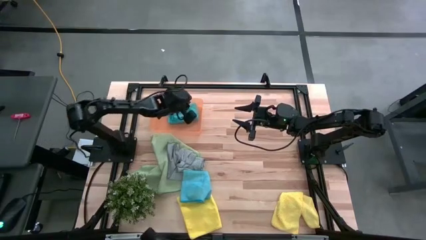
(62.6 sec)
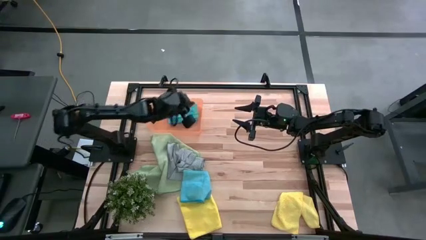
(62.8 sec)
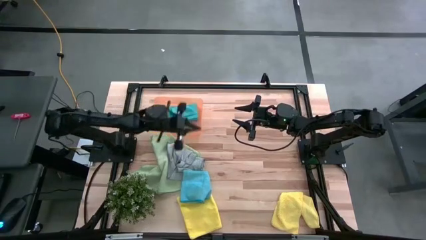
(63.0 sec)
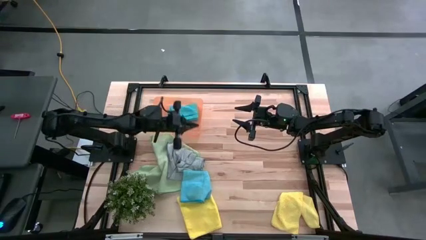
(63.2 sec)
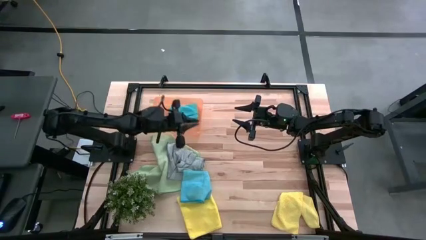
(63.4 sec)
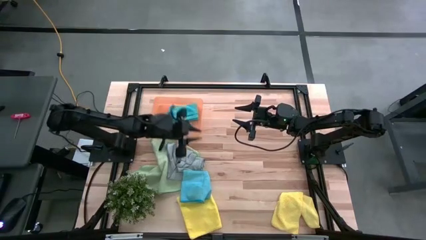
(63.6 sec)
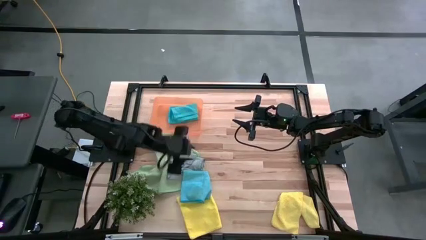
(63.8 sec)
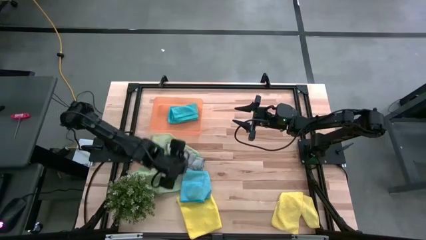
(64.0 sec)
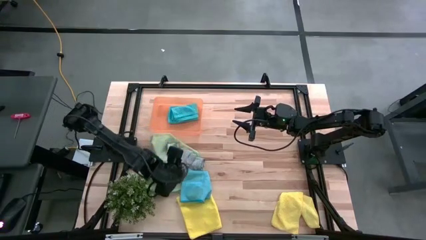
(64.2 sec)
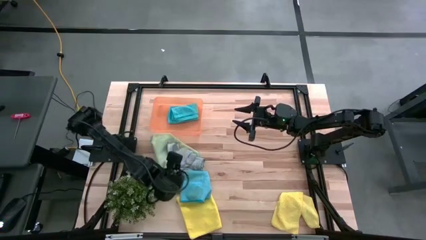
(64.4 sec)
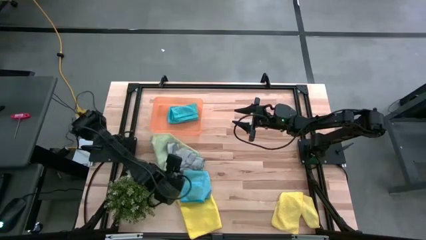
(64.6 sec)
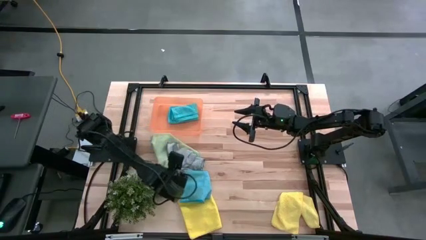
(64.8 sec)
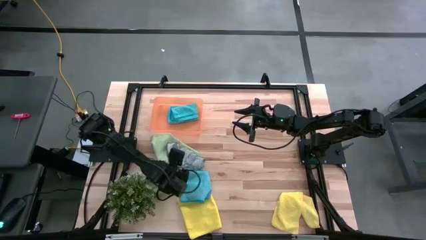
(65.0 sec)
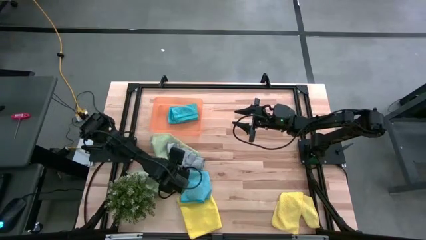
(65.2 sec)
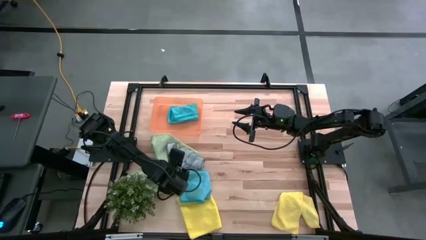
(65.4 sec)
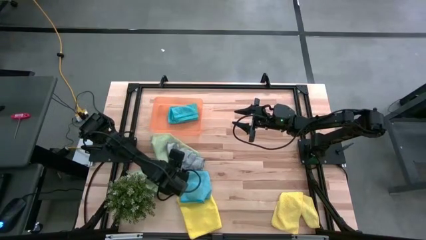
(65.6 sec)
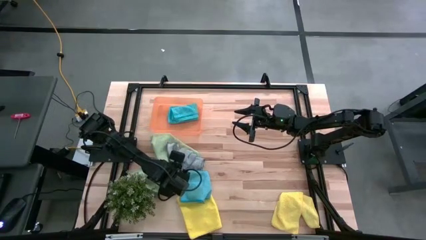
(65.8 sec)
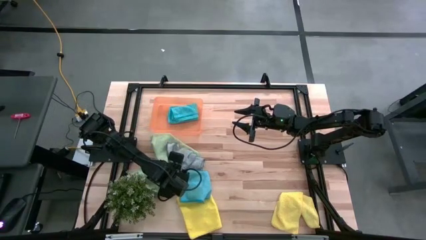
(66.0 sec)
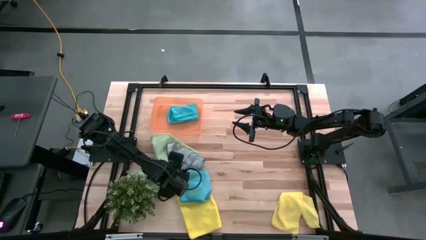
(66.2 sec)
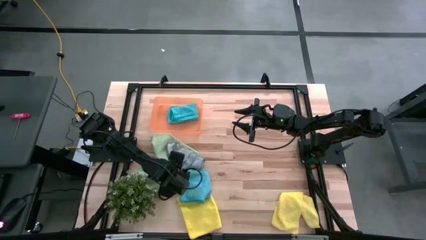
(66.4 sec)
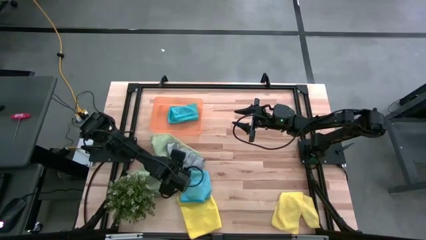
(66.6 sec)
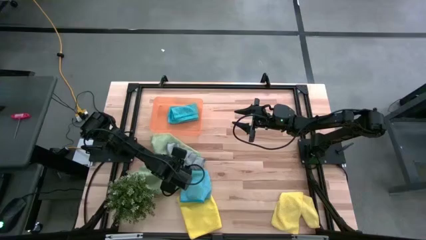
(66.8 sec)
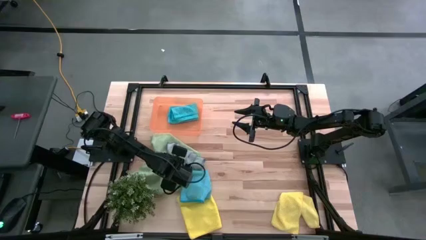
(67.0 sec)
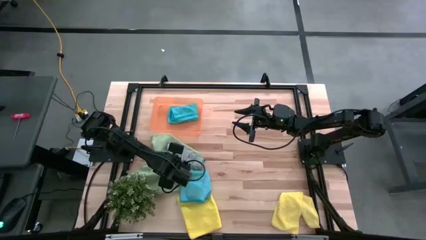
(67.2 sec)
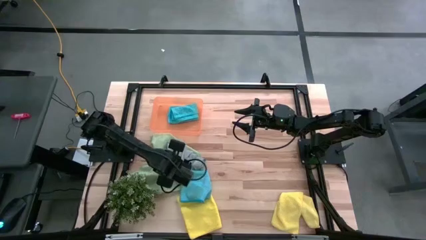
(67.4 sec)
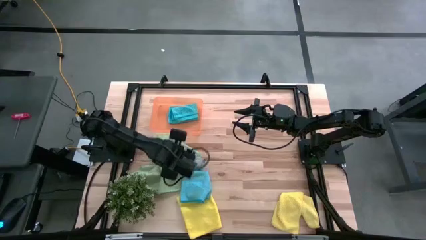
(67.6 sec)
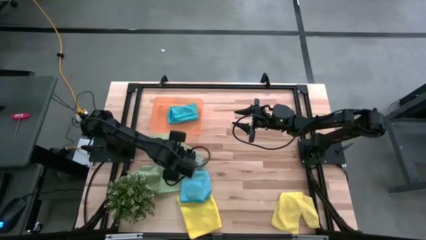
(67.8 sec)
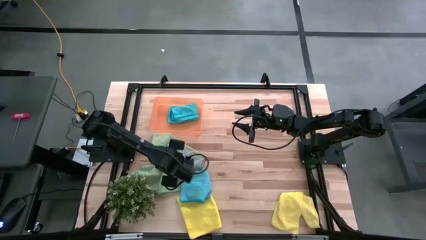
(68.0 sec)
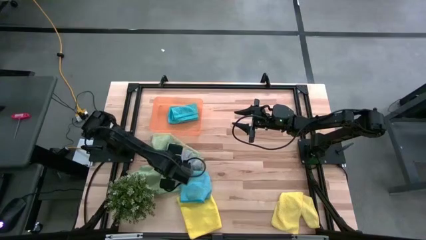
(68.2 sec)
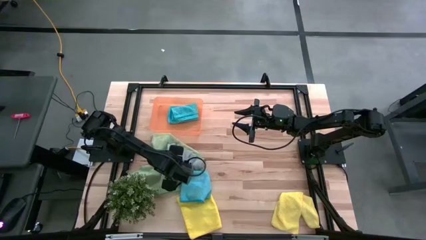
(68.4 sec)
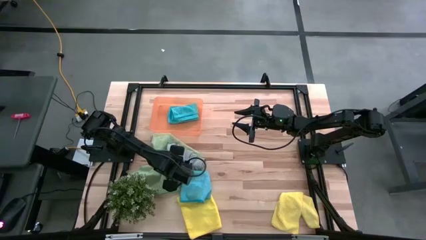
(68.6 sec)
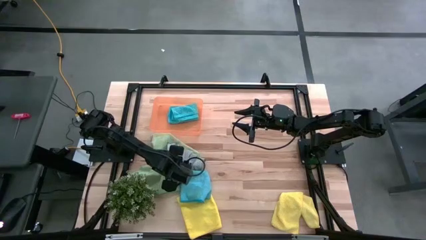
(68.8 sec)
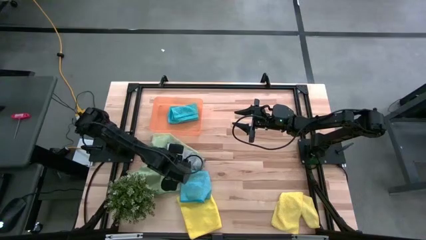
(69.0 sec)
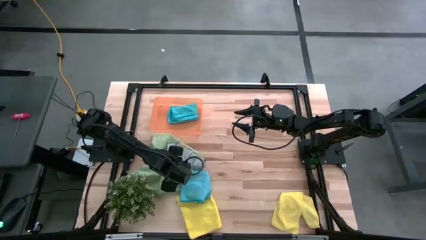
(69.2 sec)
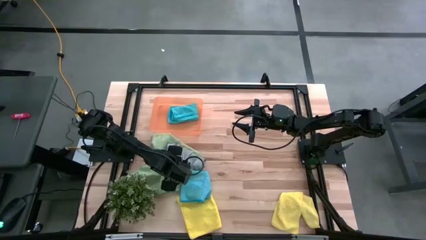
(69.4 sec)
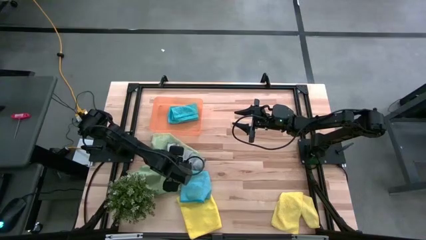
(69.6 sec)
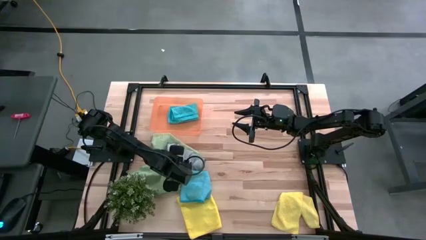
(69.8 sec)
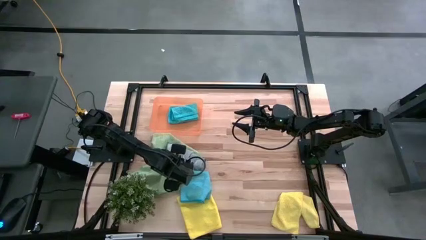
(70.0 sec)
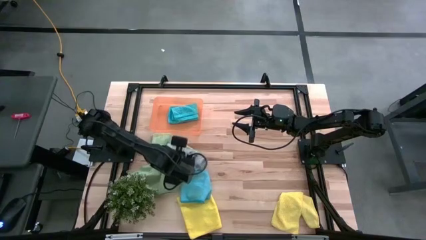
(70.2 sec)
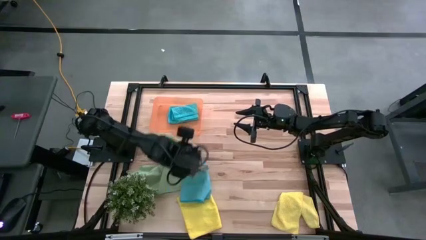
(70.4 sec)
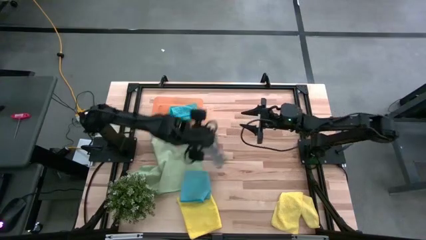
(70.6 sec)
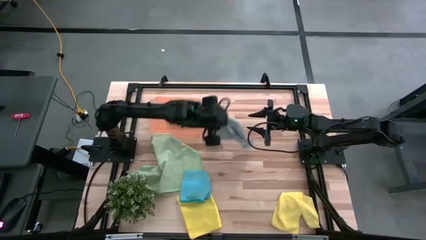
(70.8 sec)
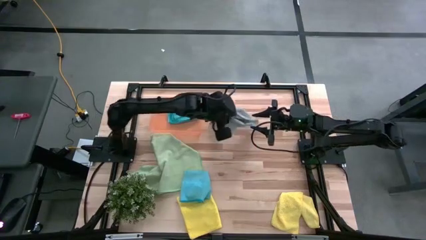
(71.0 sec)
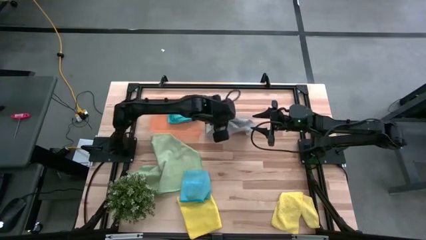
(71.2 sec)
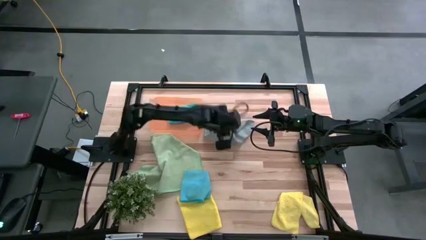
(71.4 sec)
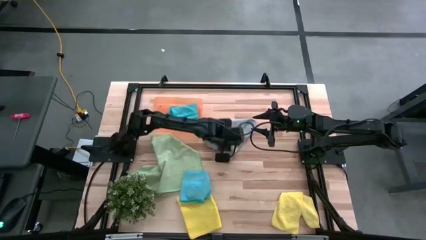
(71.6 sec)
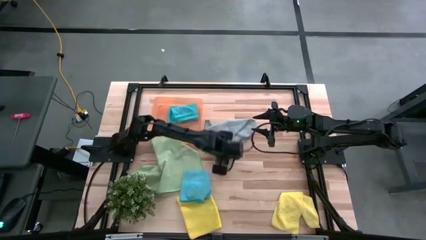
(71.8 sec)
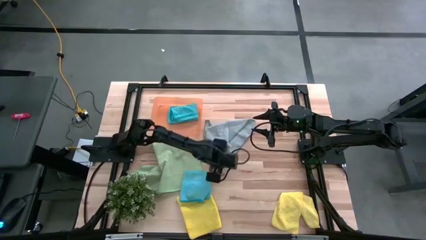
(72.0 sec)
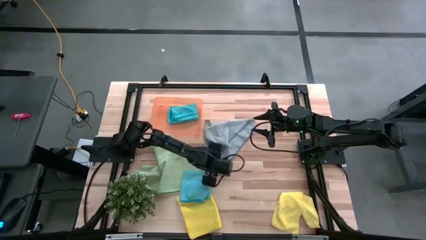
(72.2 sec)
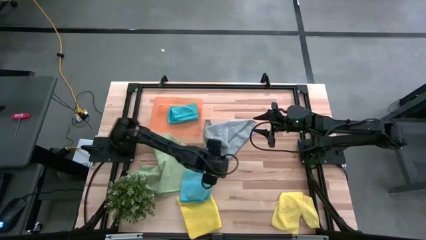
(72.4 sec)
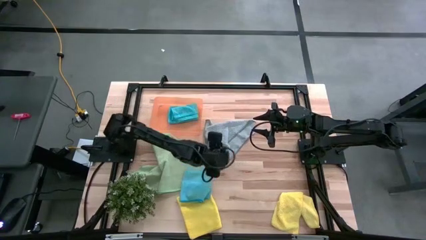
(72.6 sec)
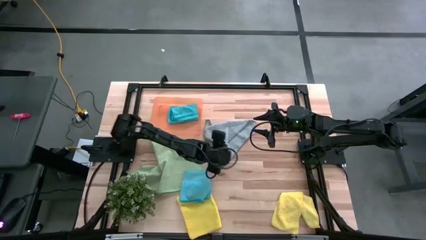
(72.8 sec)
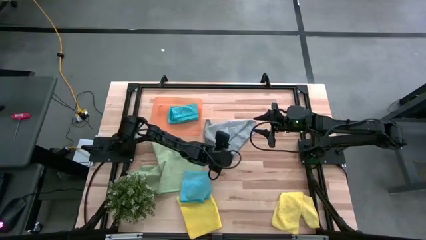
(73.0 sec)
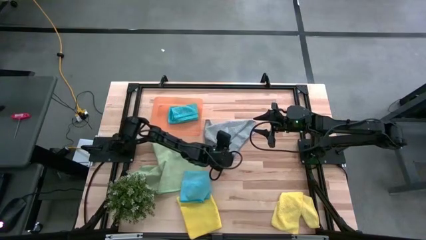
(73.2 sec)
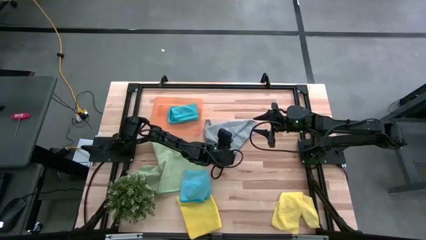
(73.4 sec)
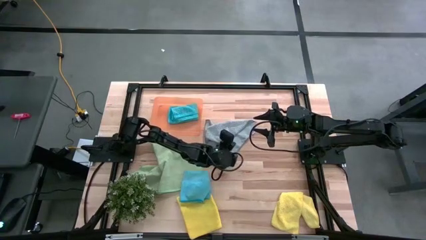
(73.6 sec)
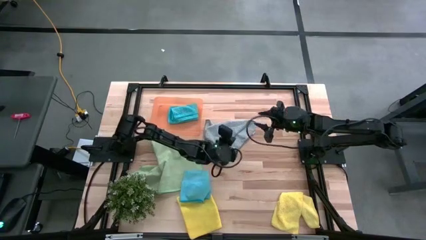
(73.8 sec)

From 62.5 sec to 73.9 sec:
Task: Fold microfiber towels
Fold the gray microfiber cloth
